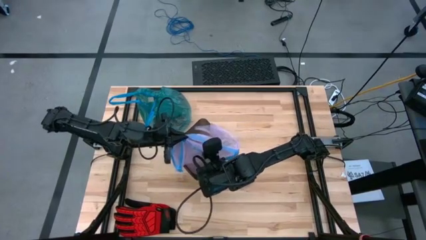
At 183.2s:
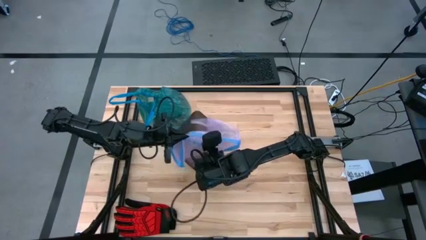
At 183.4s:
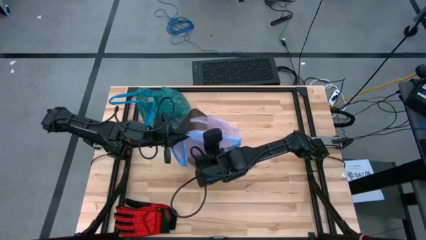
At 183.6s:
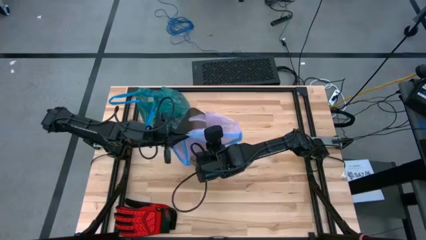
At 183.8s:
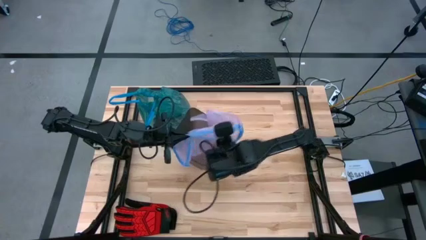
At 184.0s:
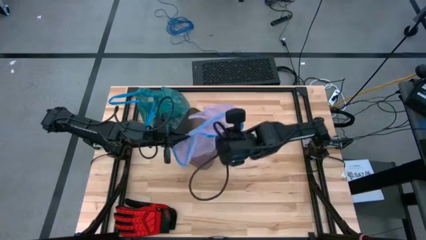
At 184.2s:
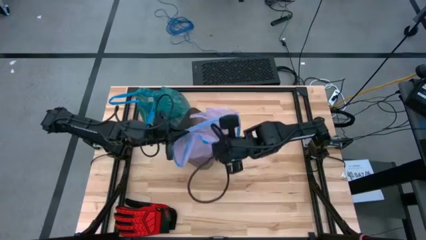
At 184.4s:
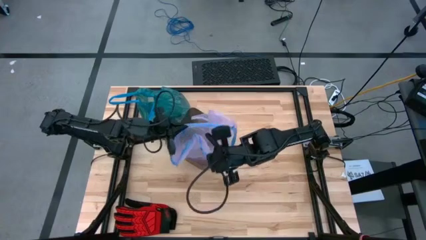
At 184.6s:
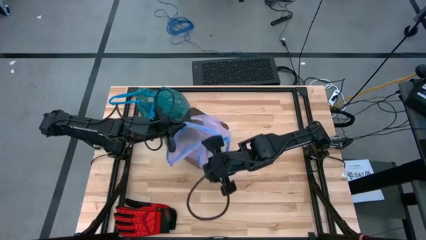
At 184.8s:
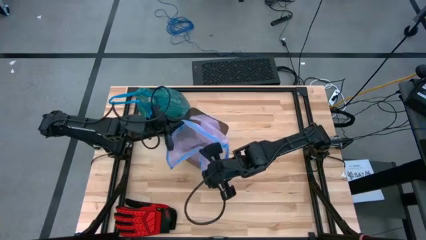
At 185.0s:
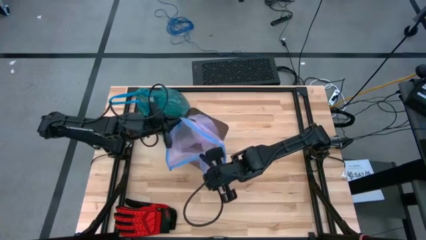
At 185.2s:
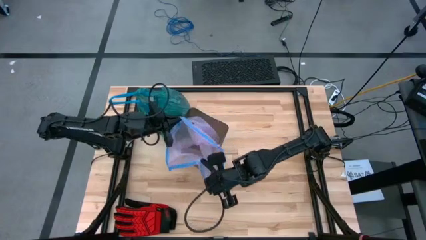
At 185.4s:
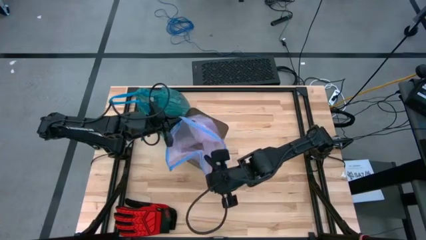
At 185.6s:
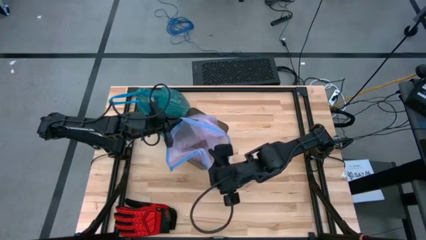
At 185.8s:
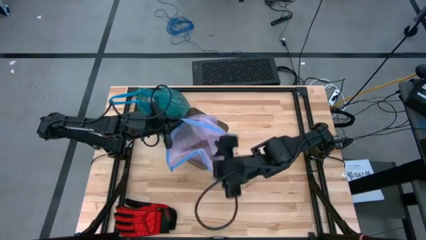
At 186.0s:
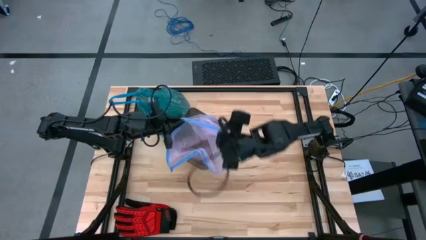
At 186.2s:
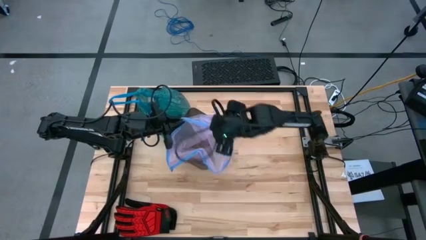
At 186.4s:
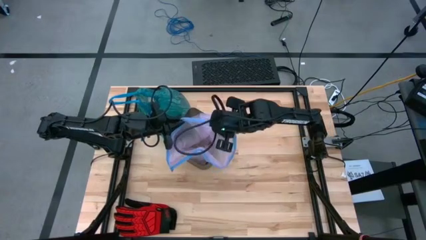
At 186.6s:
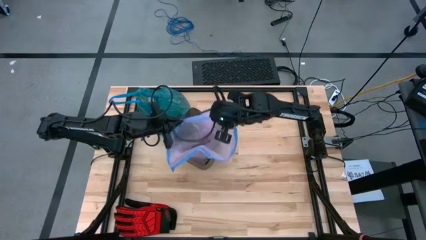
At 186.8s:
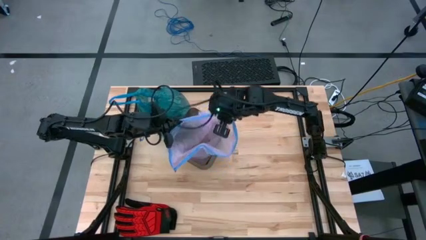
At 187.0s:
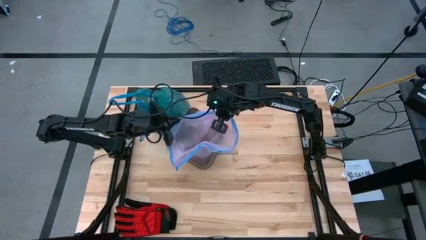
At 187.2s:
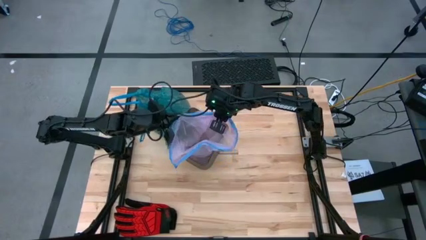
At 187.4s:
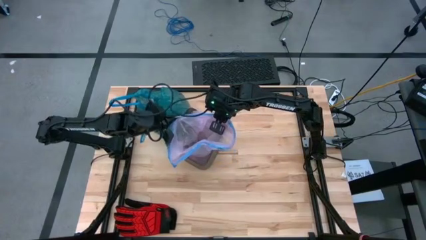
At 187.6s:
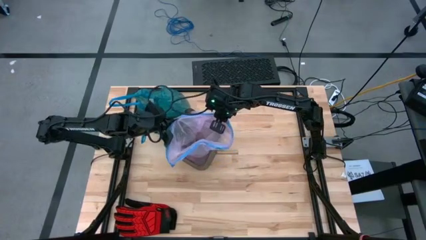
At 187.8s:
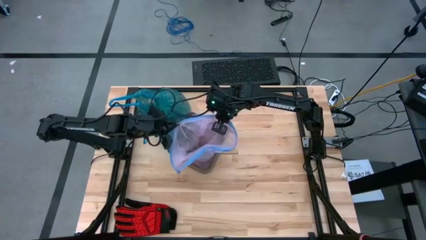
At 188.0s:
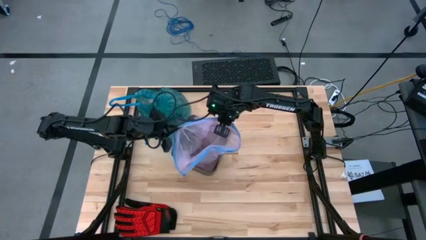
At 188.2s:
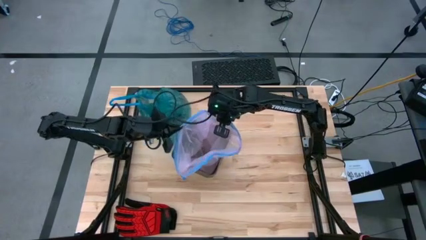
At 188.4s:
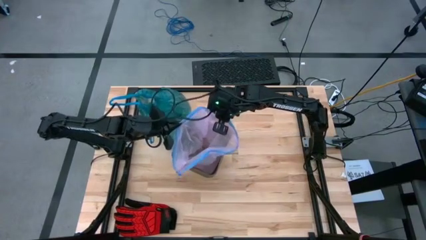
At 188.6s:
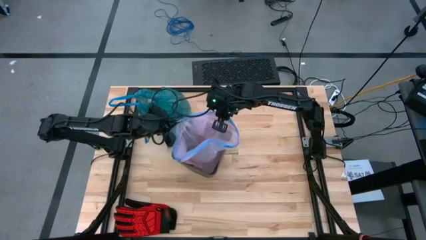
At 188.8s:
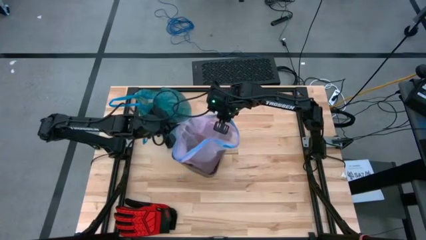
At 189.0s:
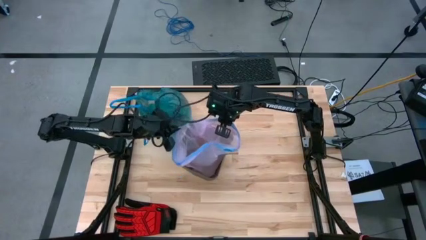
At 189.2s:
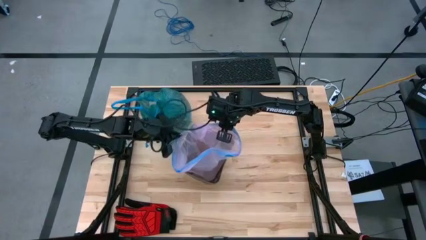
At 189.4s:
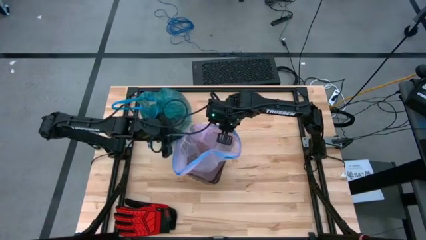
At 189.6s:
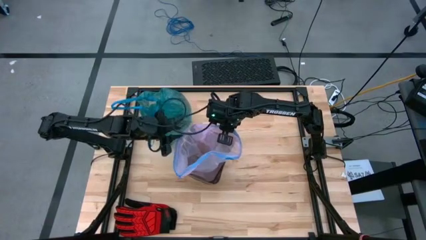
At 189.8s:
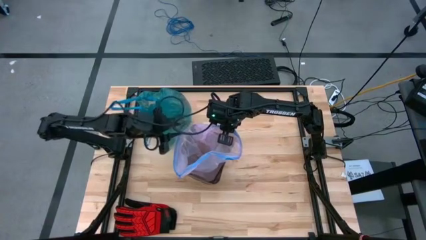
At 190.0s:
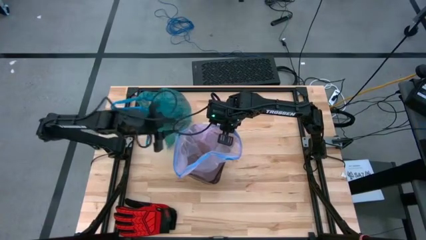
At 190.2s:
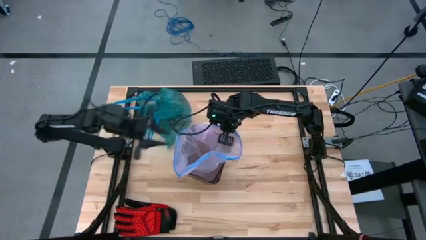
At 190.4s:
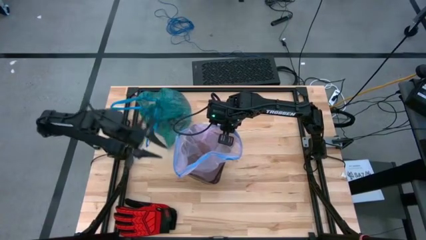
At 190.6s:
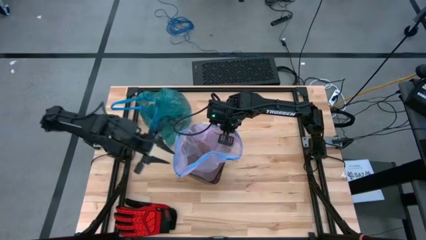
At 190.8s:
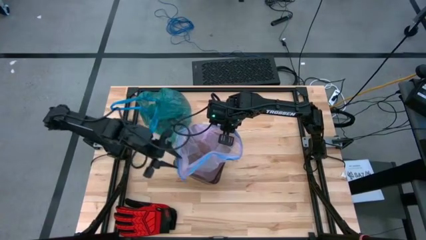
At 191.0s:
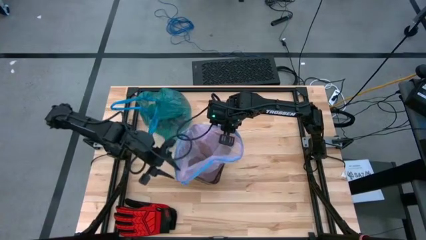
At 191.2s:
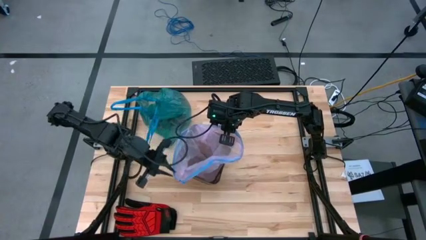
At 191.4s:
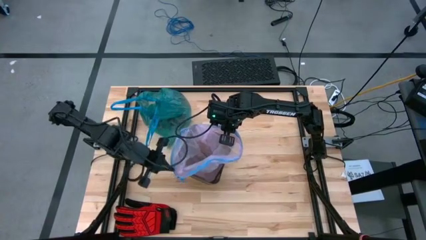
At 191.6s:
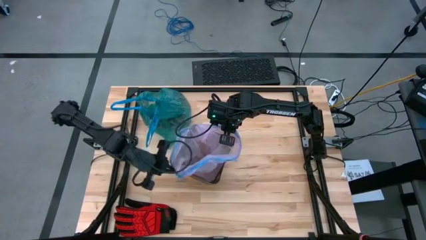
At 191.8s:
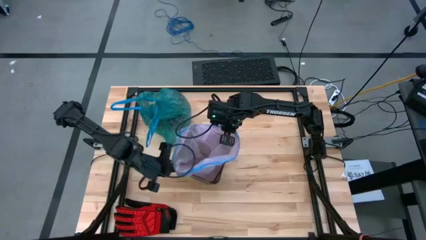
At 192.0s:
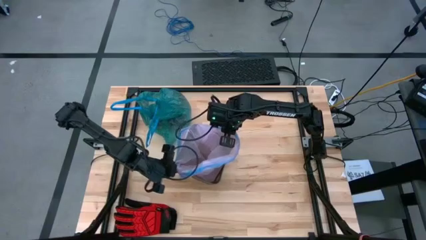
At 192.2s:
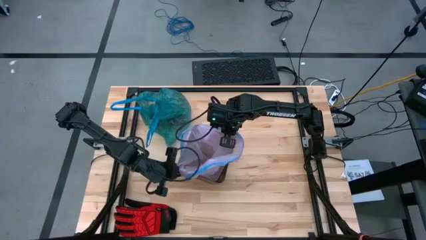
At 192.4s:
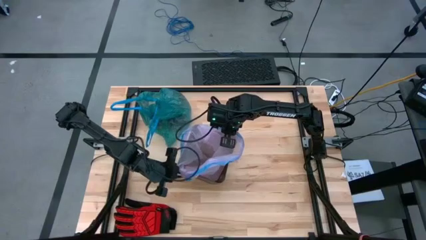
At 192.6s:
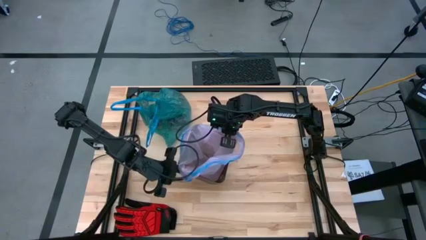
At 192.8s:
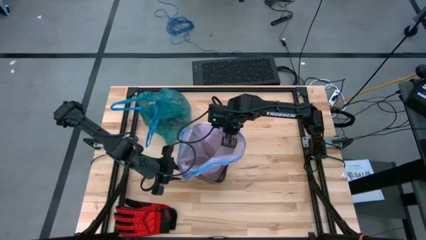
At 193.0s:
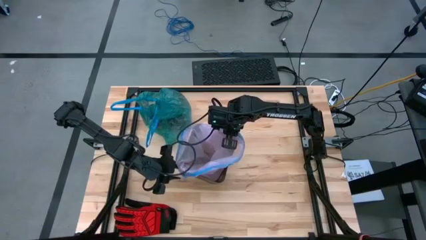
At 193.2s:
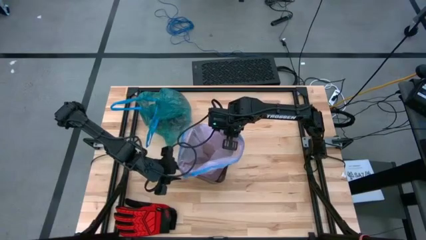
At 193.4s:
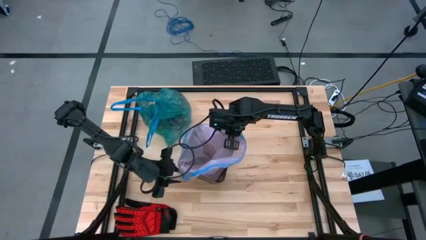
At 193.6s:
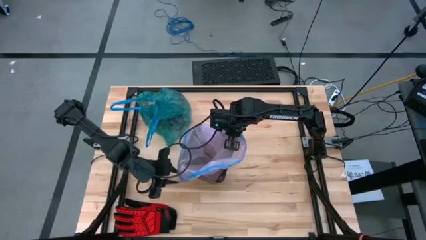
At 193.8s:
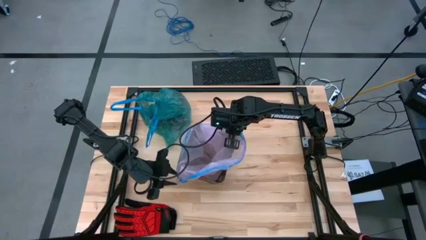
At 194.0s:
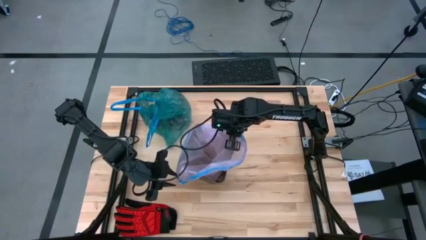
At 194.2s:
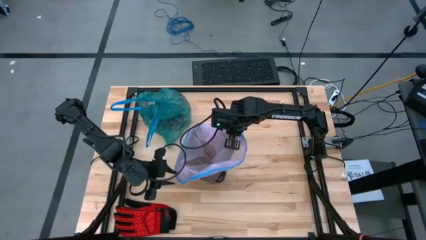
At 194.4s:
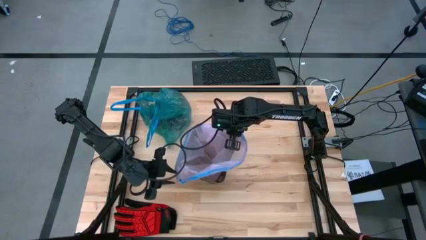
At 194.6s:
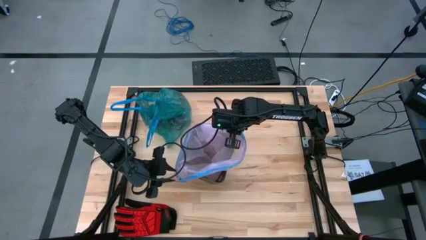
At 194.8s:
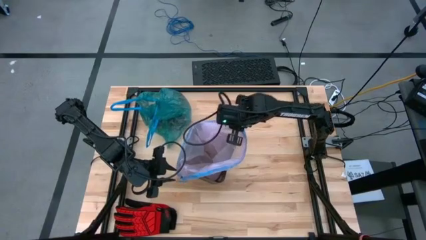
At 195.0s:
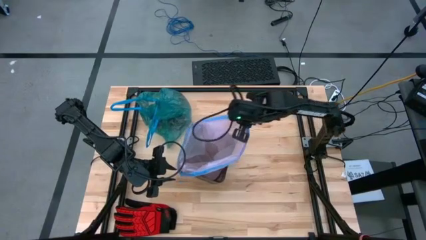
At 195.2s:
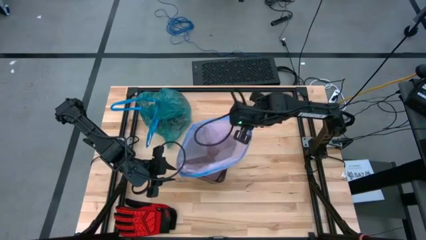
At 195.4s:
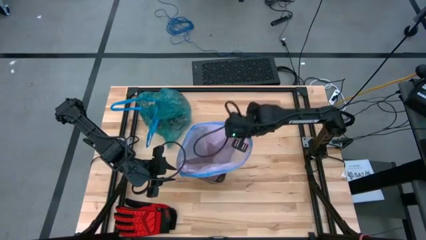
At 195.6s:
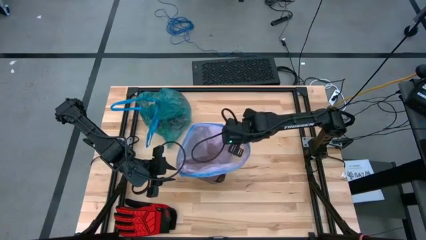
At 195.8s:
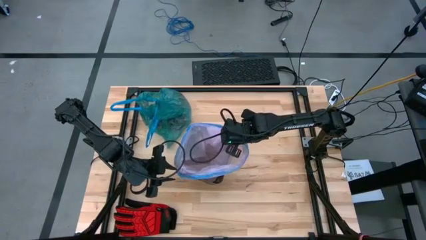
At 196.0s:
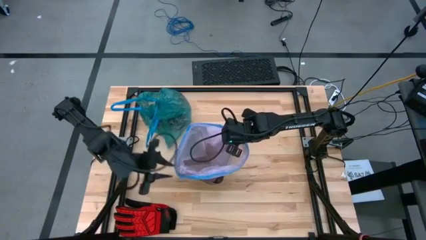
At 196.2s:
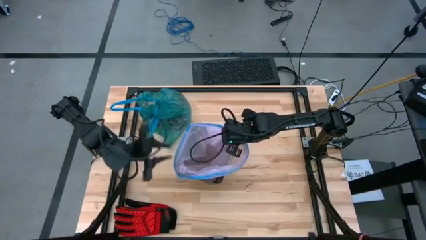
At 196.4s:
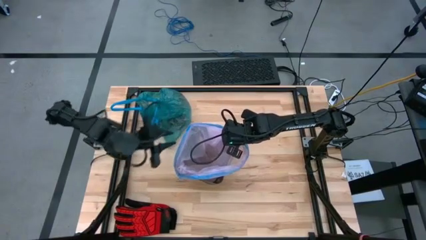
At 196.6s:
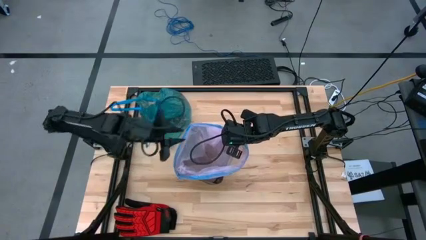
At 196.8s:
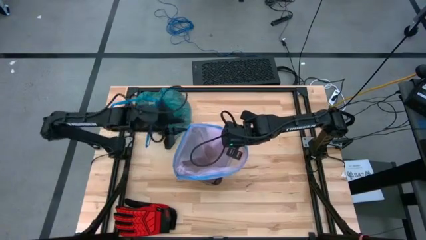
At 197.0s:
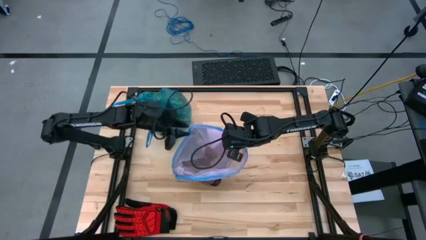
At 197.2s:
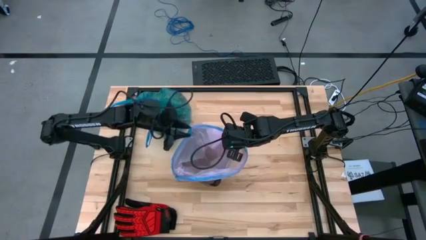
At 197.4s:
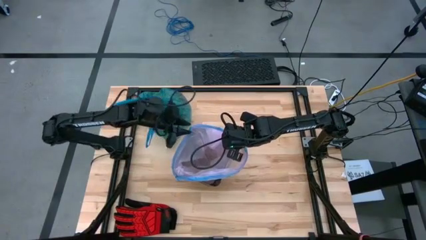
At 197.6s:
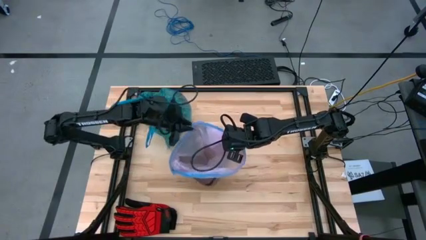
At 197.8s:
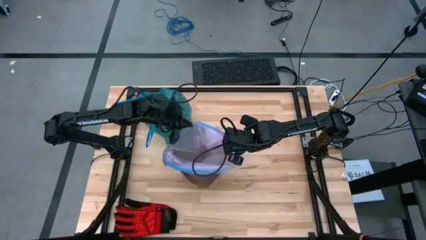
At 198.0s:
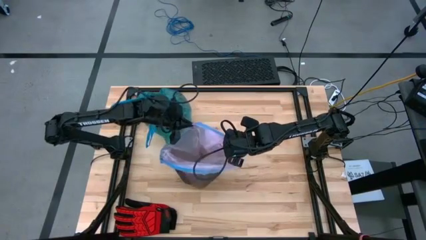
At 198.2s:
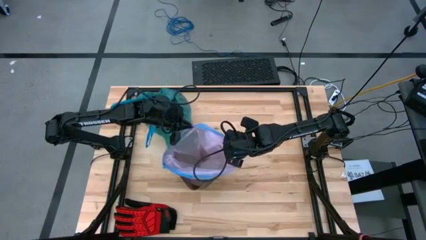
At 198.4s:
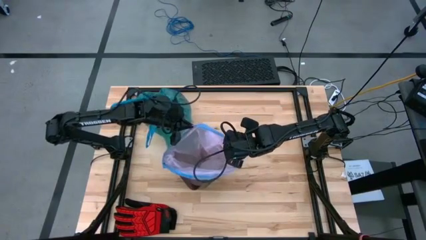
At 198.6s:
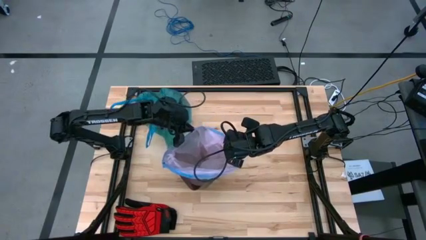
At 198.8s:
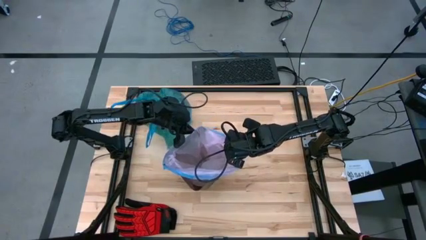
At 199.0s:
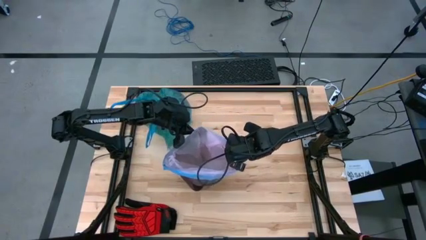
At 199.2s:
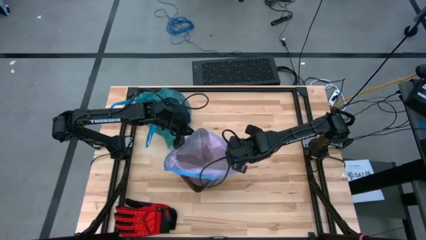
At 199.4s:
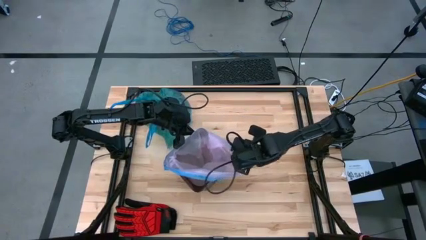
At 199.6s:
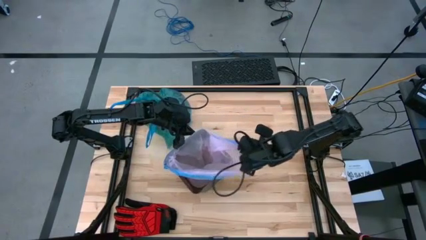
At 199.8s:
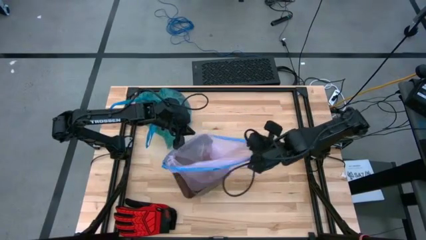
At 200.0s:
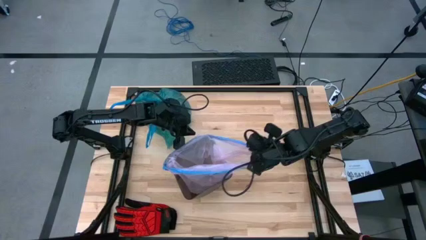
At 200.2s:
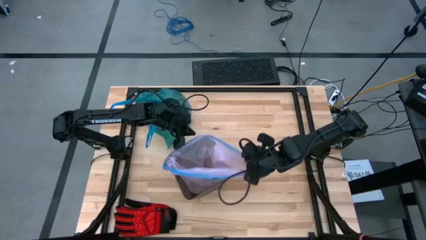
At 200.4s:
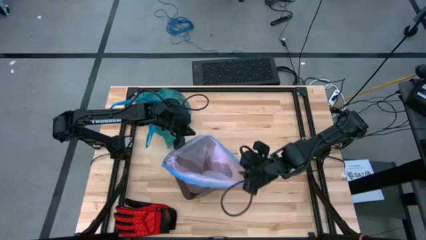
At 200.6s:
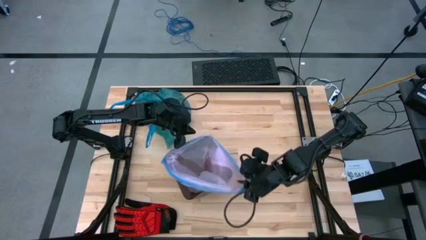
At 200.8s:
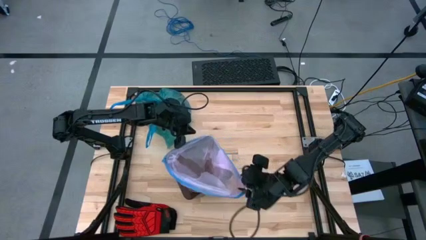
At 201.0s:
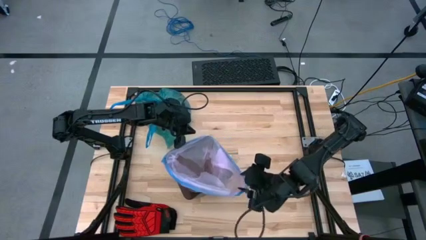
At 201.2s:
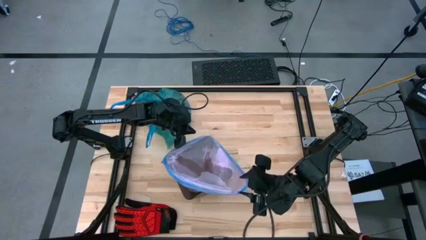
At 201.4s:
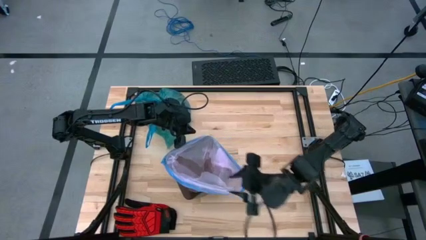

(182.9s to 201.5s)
Task: place trash/remove bag and relplace
Insert the trash bag into the trash bin
